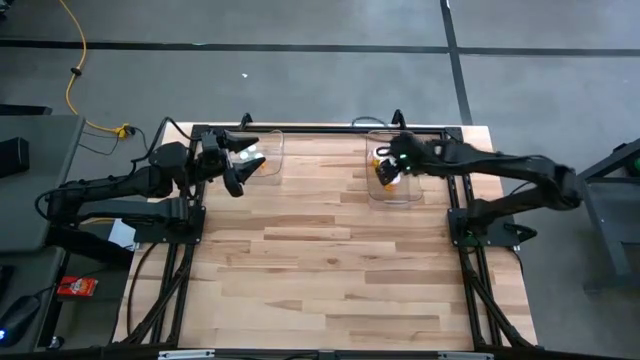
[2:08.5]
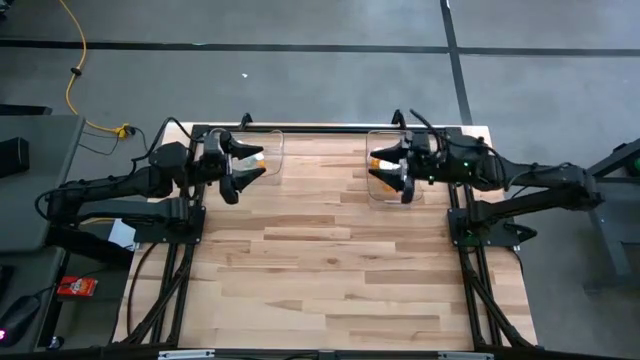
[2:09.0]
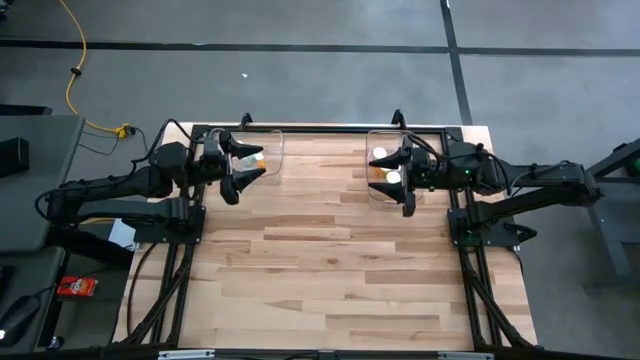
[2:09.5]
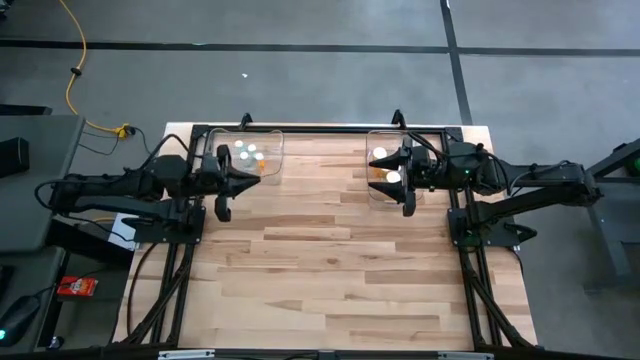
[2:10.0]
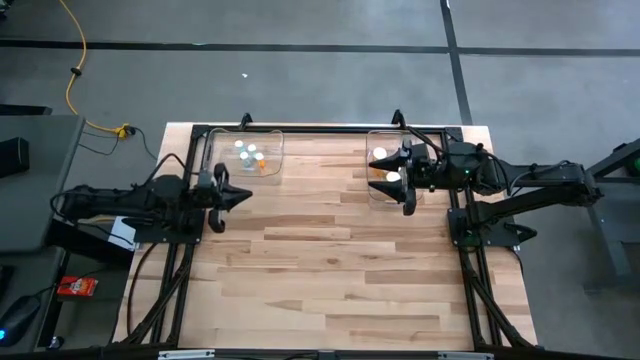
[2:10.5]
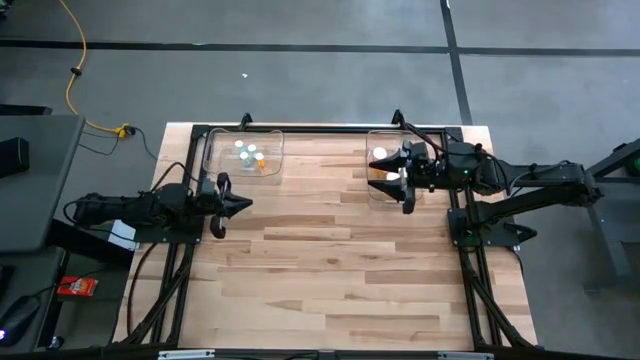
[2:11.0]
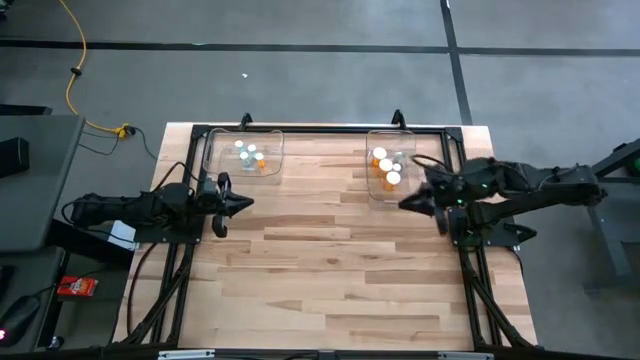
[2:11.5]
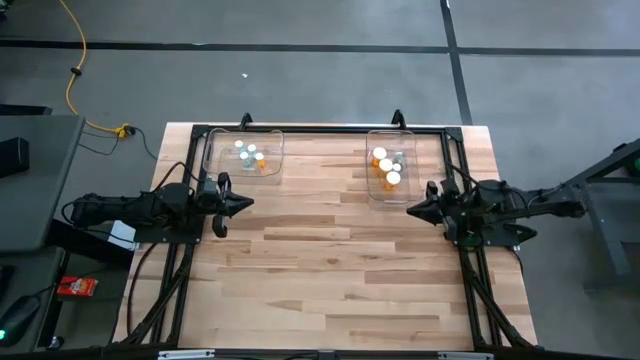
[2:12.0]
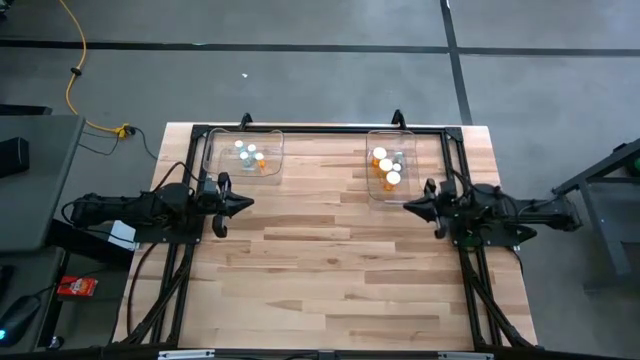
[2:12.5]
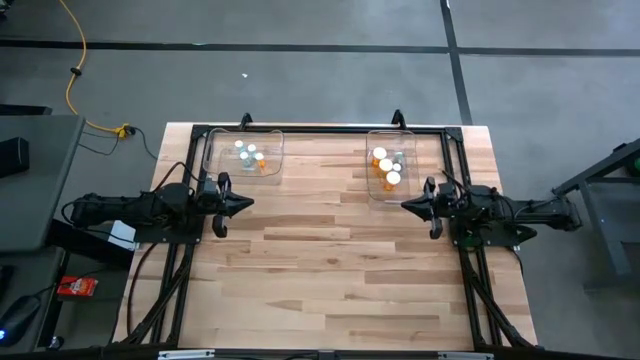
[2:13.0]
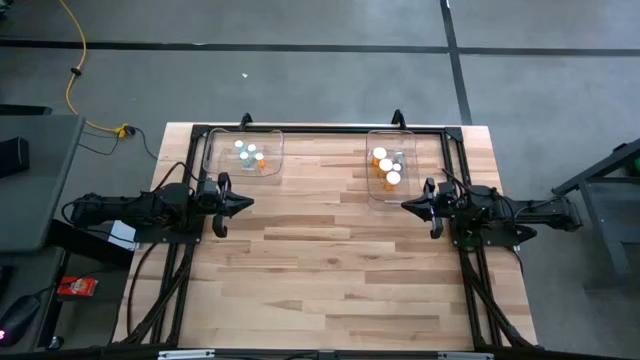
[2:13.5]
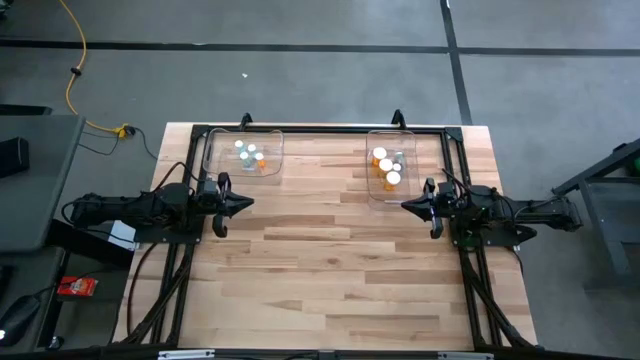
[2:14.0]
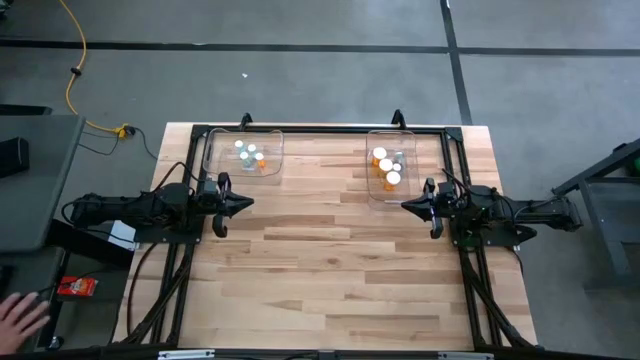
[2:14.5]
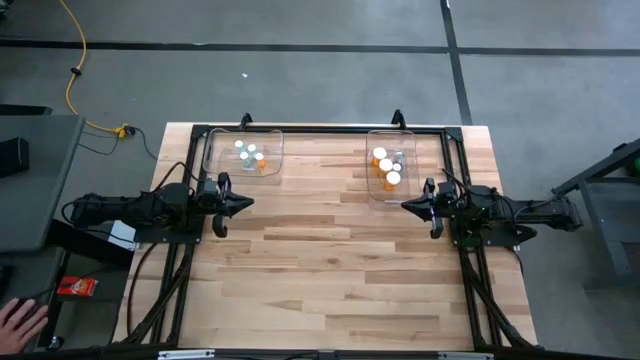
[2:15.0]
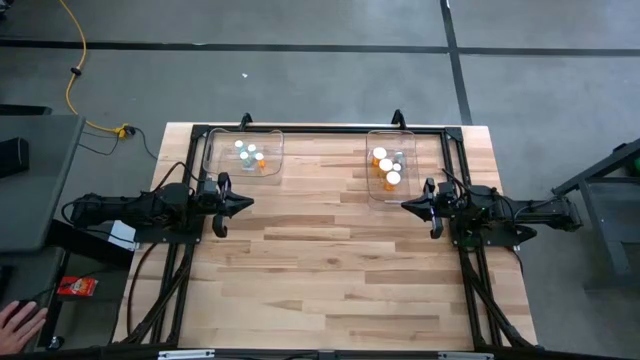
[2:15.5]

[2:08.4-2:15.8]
Task: Pick and place medicine bottles into bin by pill shape (circle, oval)
Return to Home Position

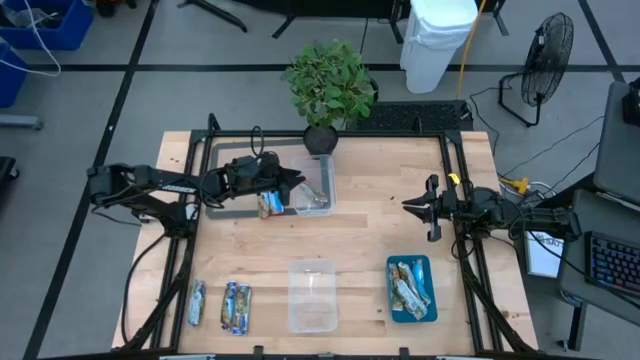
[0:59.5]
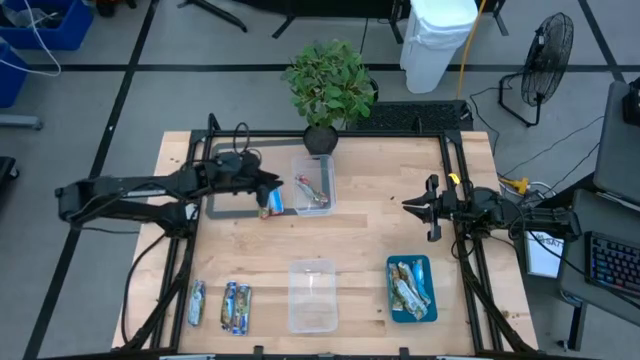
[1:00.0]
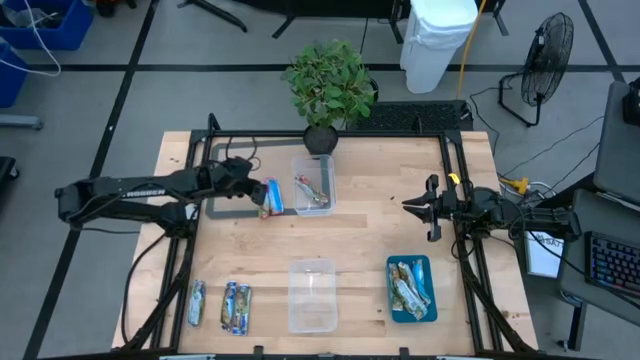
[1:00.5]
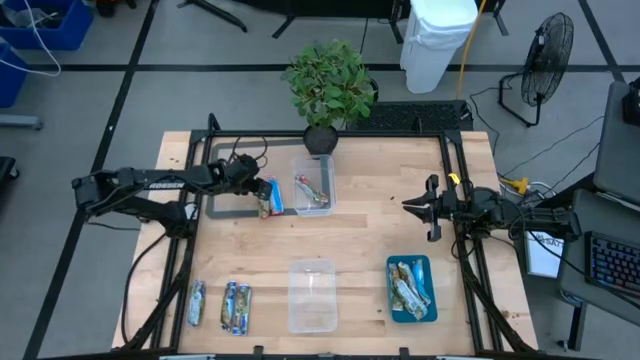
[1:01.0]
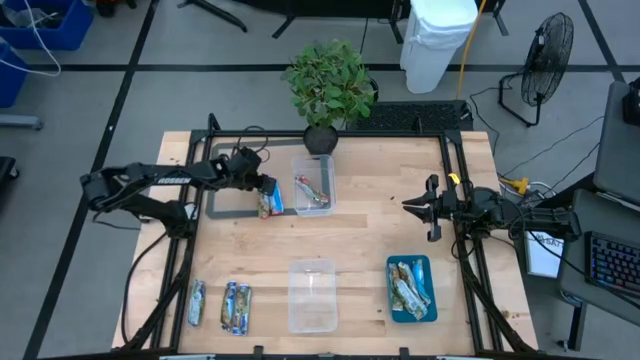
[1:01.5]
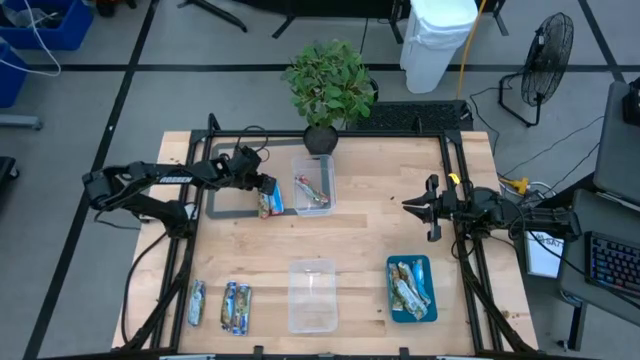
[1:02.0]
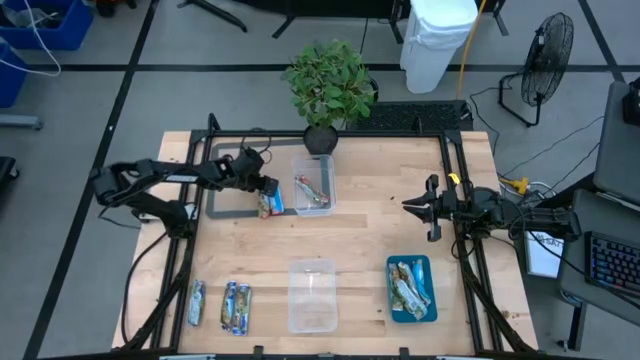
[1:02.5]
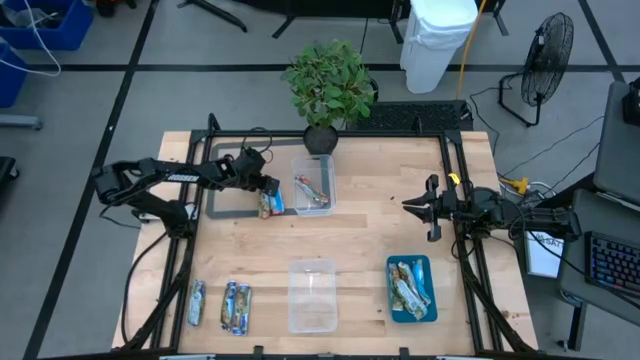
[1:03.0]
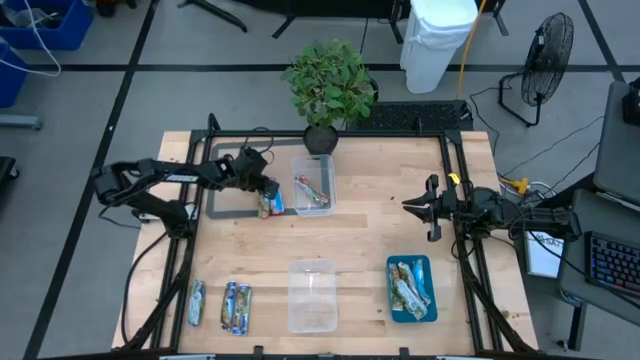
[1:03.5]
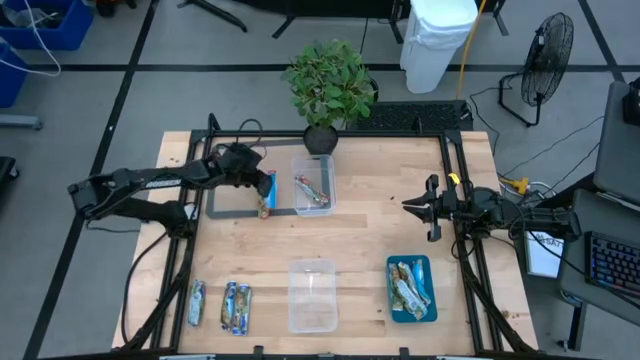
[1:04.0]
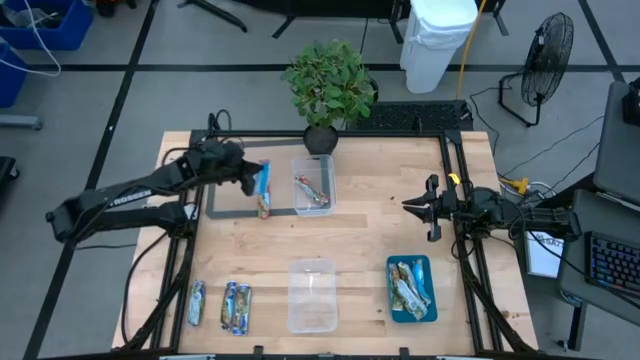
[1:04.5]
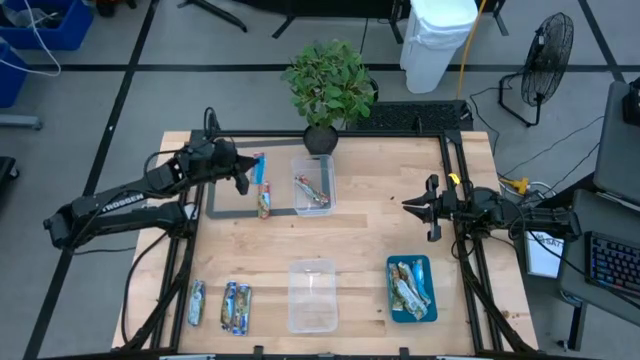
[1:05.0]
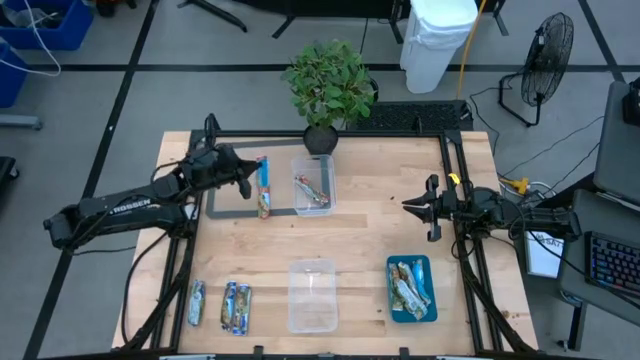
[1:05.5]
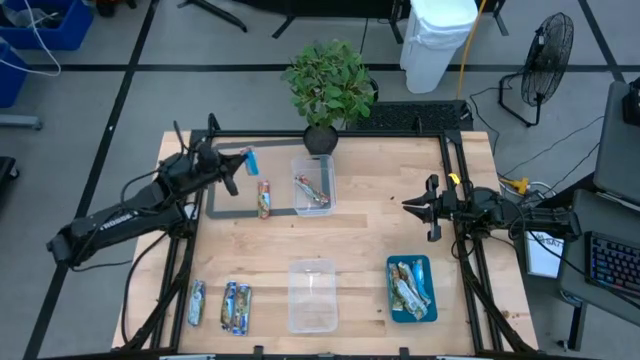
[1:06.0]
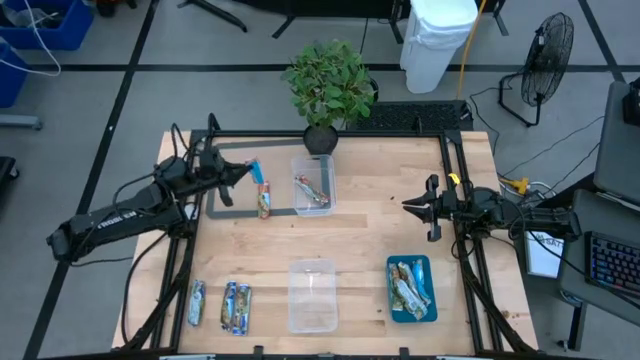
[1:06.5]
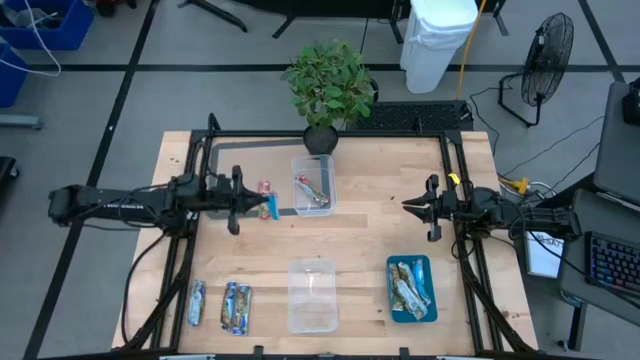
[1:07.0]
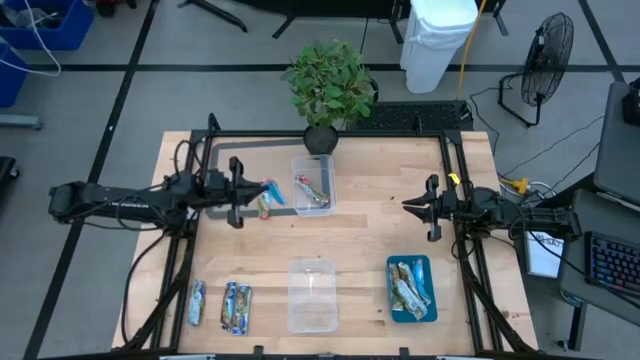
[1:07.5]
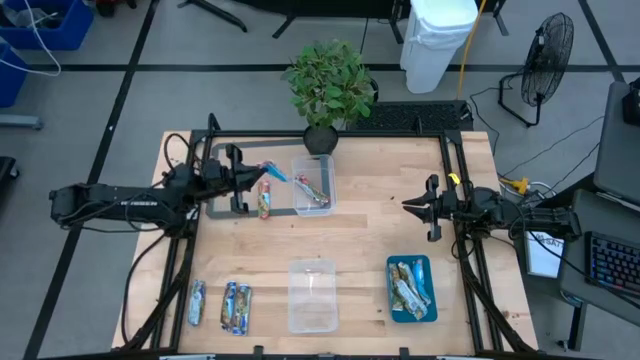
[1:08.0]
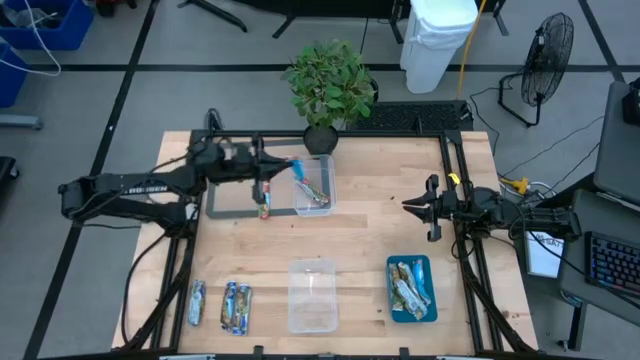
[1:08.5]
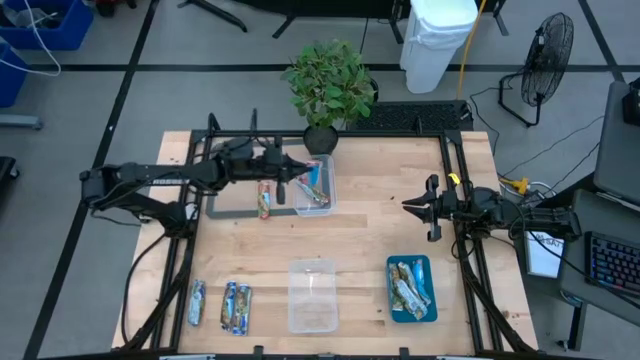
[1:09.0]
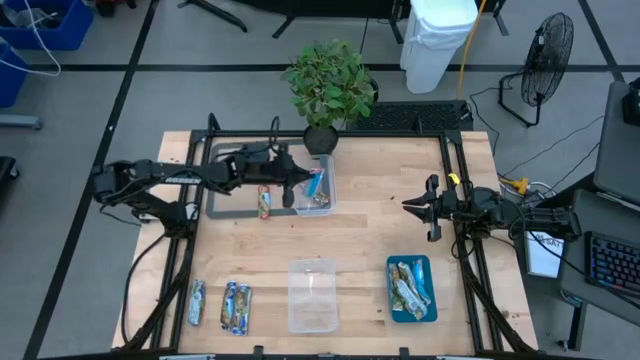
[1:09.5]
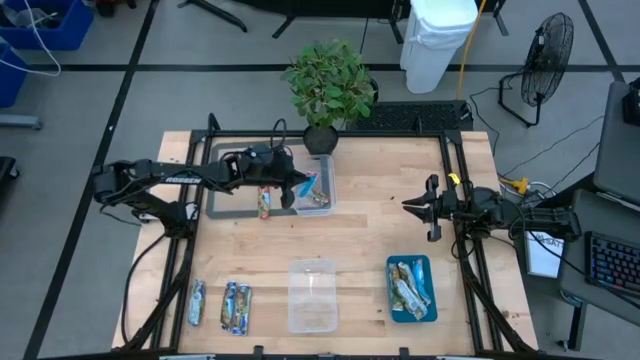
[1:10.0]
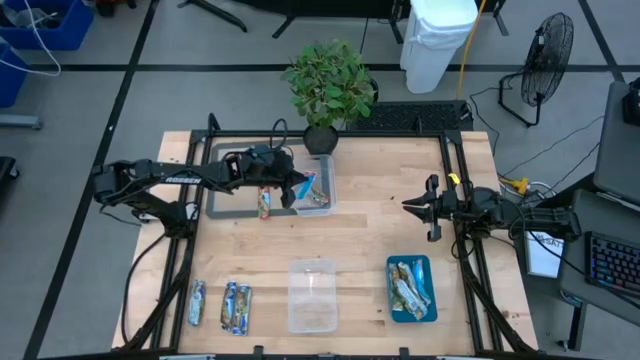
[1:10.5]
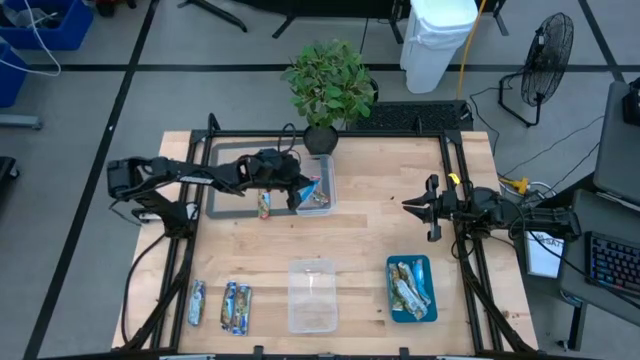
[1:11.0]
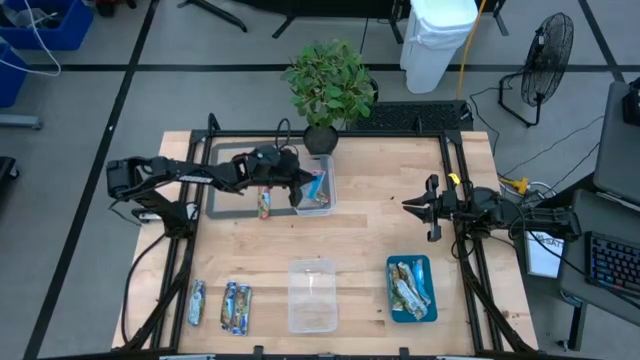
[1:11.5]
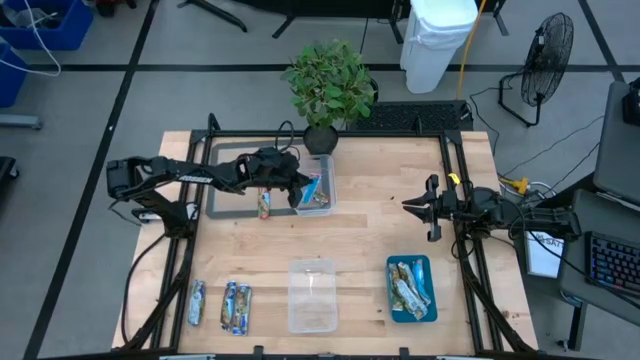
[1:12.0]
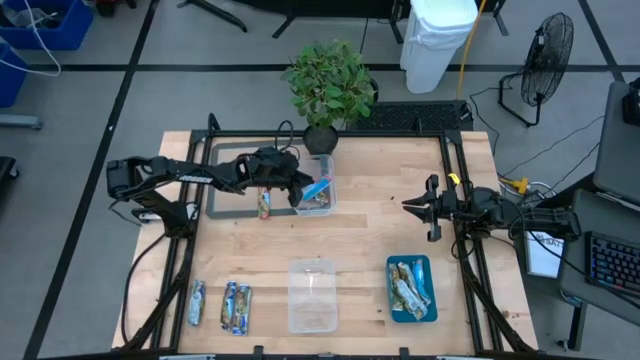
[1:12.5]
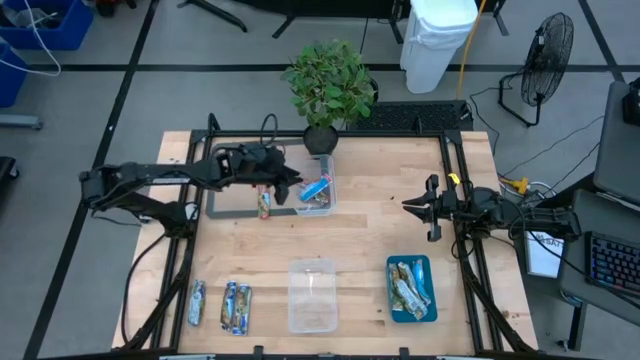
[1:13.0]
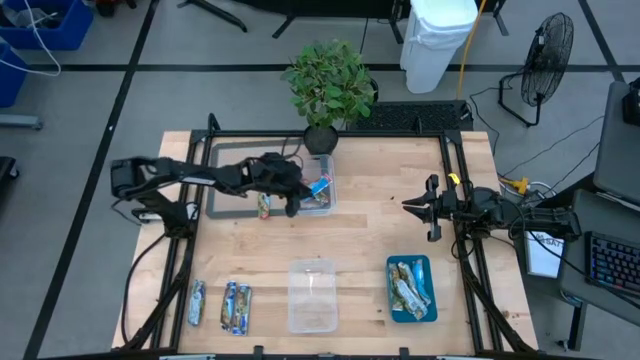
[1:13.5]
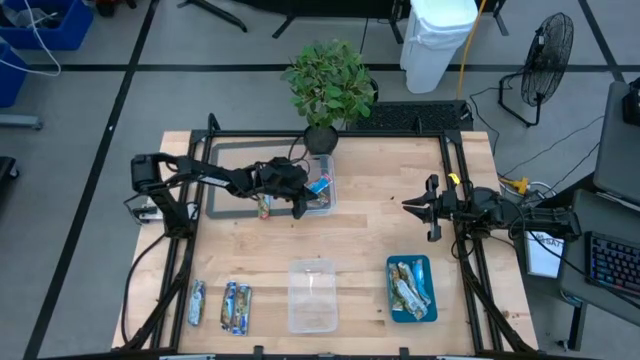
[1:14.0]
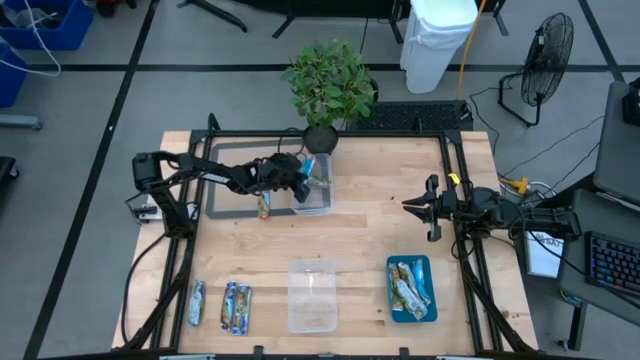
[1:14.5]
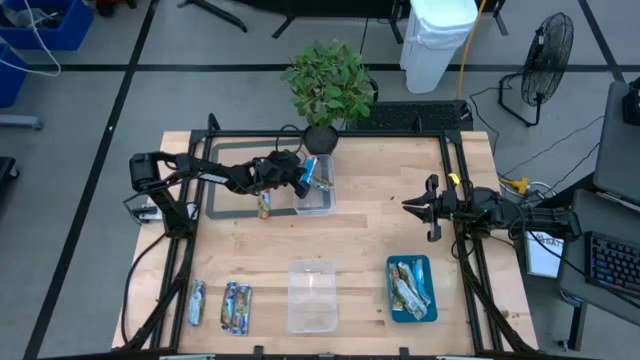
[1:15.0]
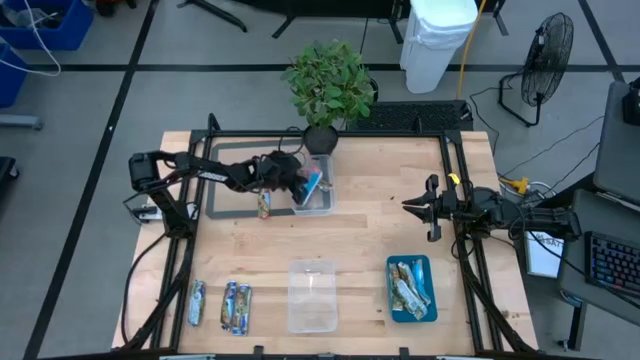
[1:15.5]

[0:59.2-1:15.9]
Task: Pick and place Granola Bars by type
Put the red granola bar into the top transparent bin
